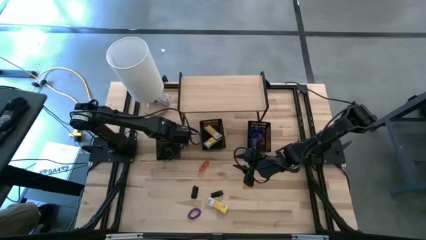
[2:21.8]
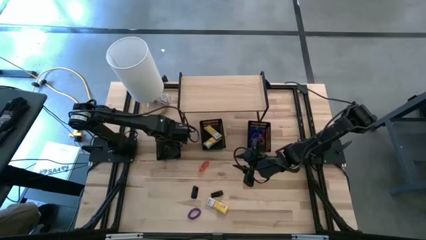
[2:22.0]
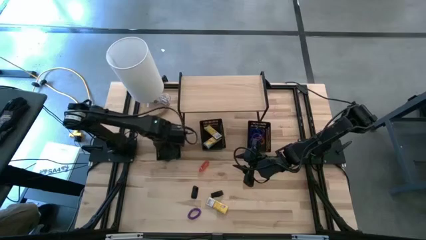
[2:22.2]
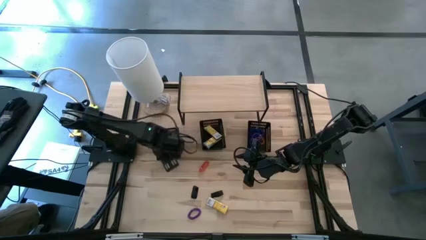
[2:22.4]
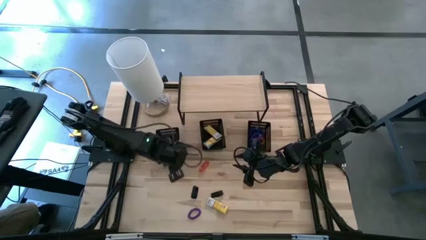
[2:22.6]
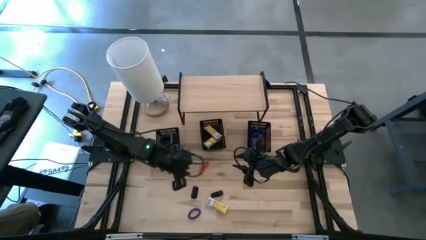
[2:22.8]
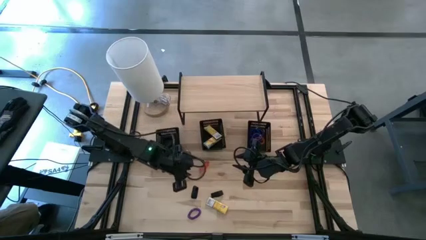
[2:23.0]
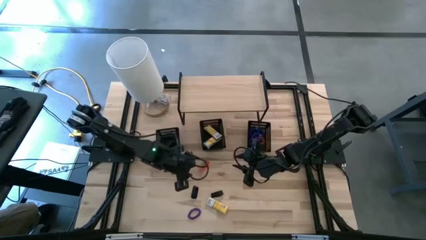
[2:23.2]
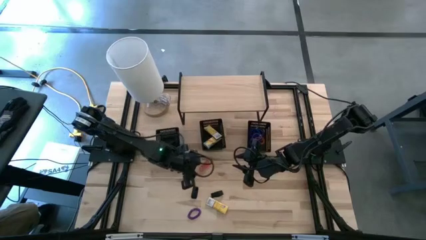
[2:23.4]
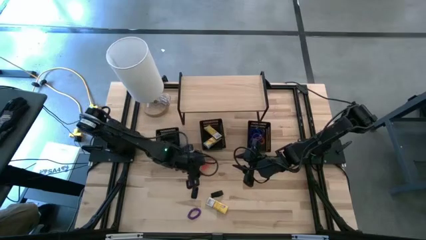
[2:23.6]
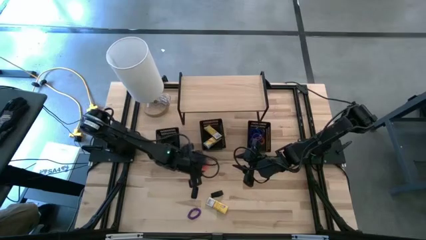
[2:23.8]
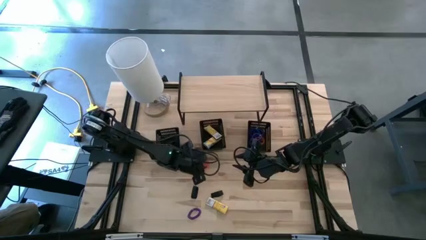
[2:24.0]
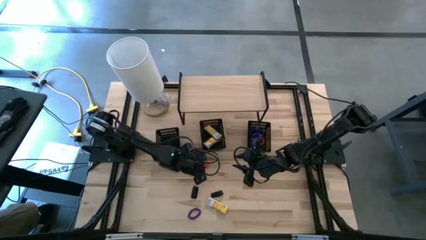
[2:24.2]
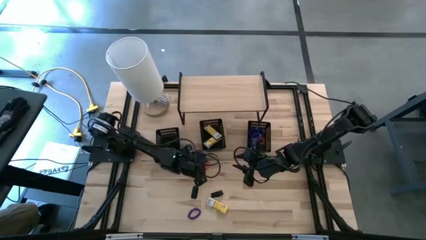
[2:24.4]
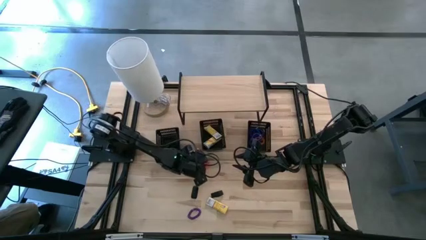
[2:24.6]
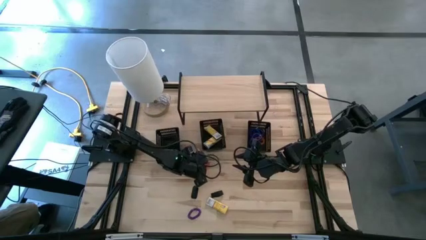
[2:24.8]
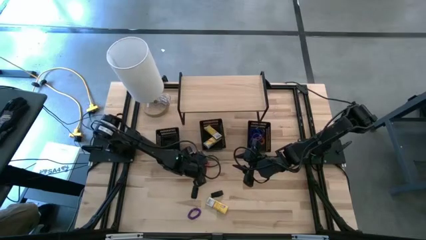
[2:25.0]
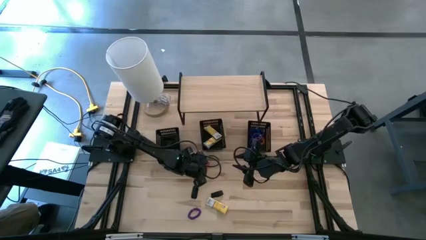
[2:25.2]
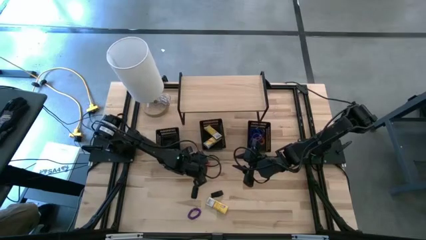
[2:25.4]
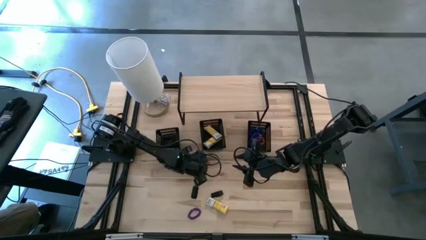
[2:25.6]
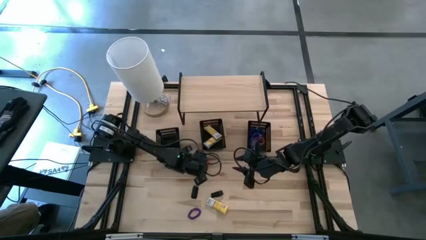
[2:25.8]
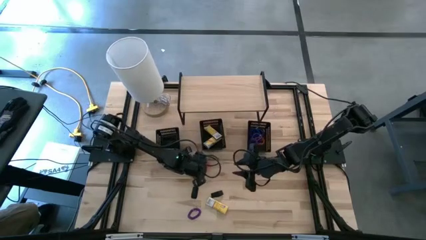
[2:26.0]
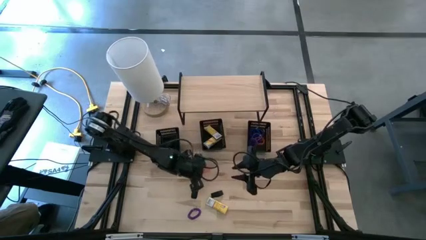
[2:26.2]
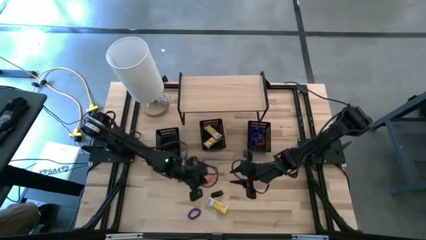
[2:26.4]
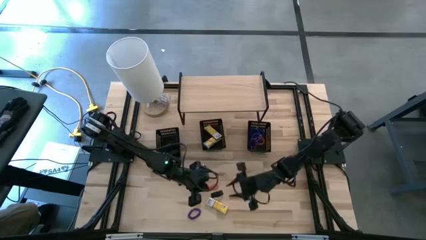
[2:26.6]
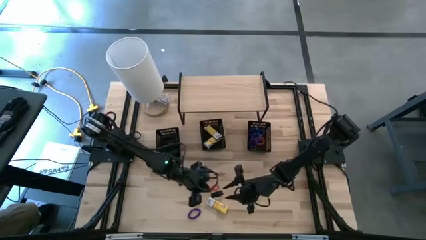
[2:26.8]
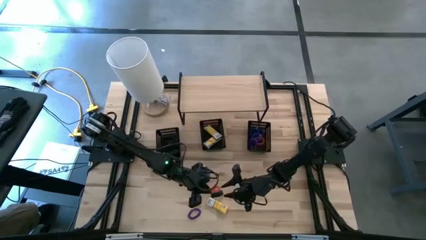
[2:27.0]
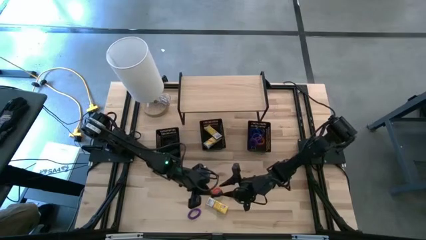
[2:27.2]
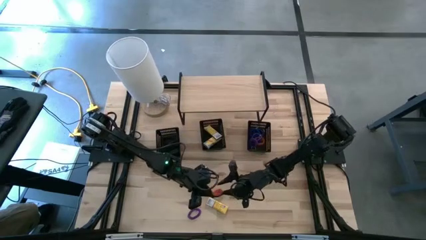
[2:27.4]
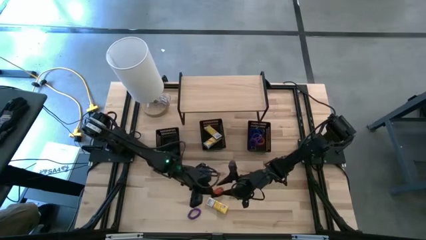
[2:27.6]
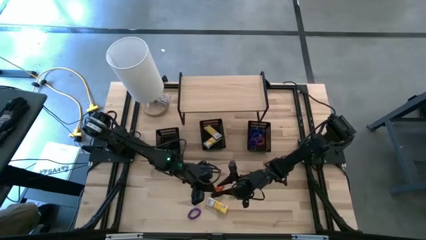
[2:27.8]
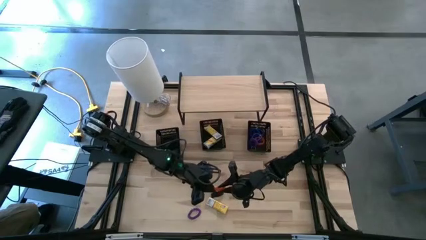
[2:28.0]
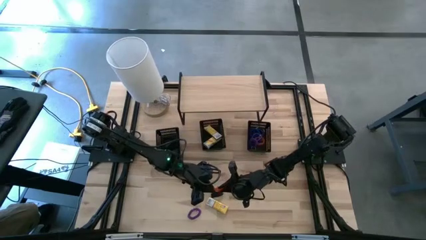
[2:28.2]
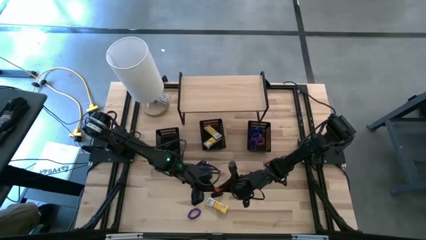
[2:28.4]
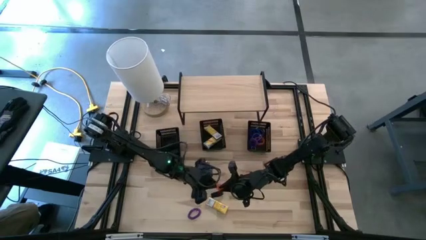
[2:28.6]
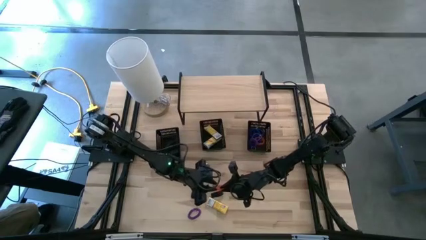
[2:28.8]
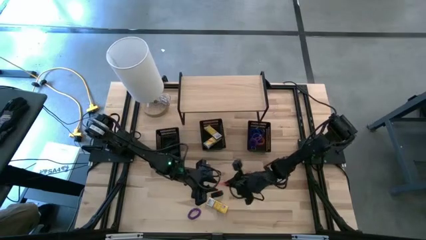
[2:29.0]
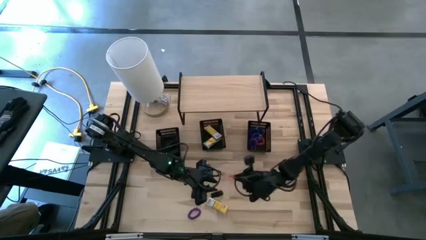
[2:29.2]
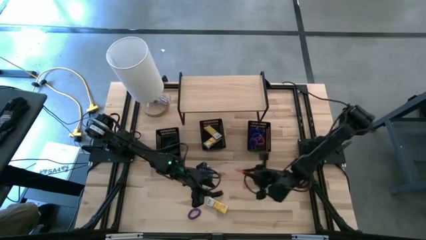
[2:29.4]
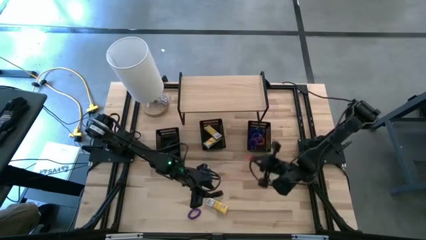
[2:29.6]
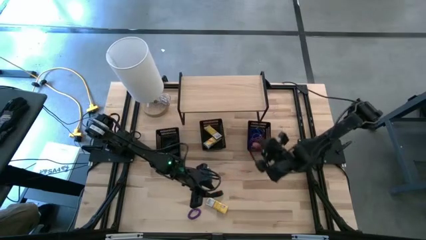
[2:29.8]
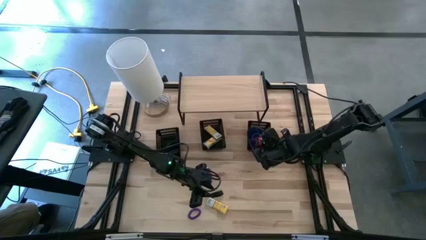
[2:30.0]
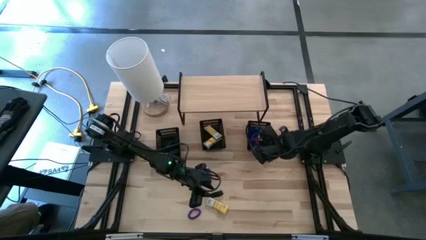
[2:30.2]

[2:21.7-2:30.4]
Task: Pick & Place Office Desk Supplies
Put the orange spring keychain into the right black bin

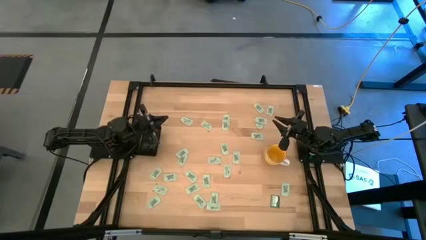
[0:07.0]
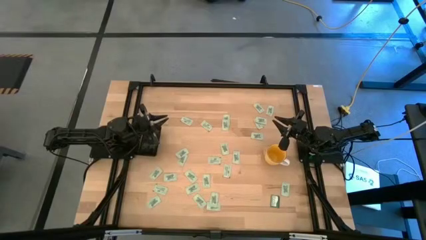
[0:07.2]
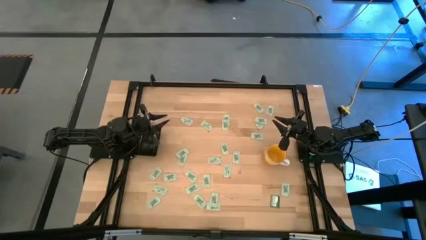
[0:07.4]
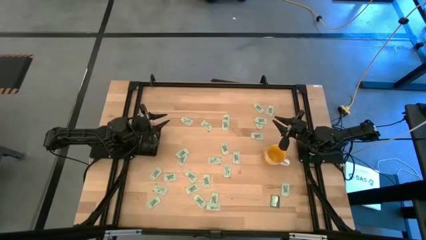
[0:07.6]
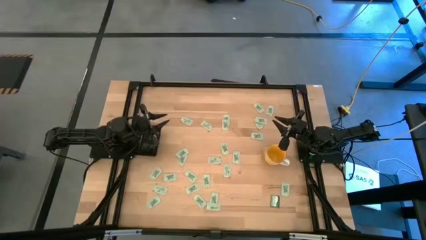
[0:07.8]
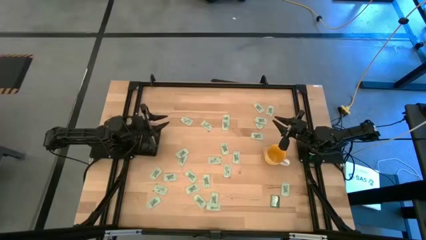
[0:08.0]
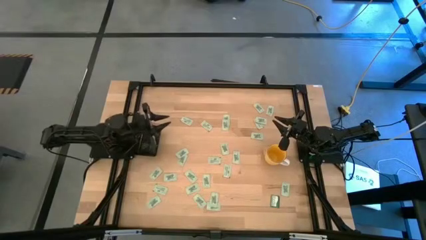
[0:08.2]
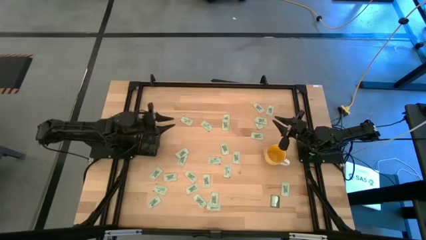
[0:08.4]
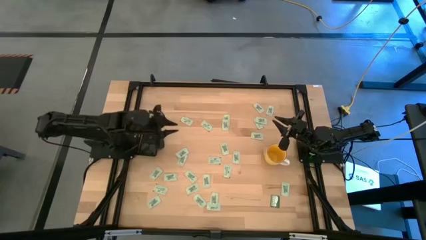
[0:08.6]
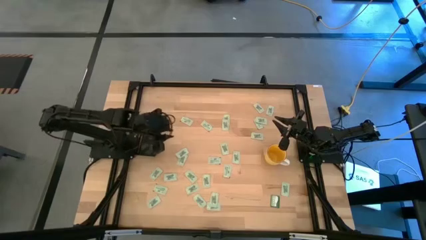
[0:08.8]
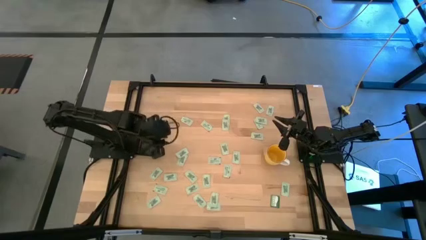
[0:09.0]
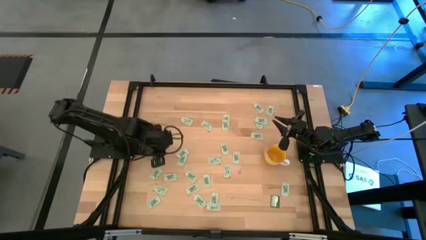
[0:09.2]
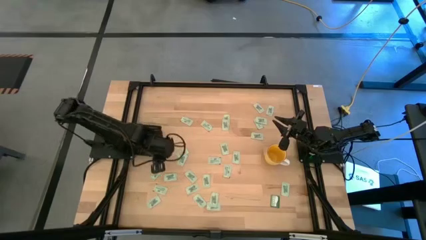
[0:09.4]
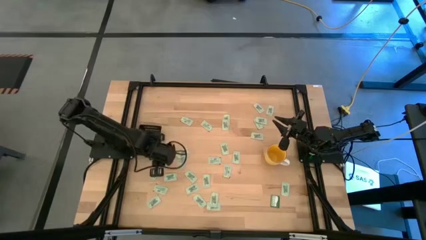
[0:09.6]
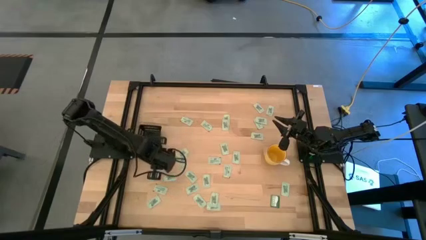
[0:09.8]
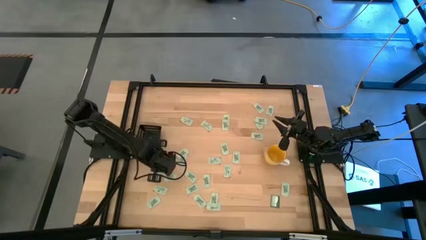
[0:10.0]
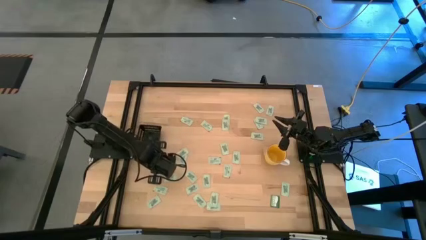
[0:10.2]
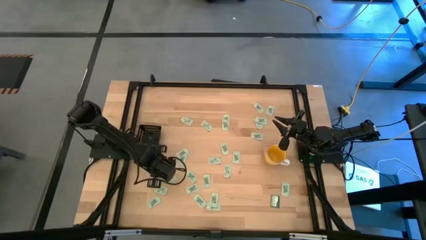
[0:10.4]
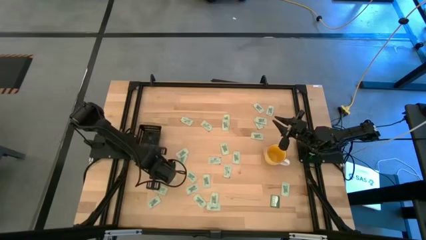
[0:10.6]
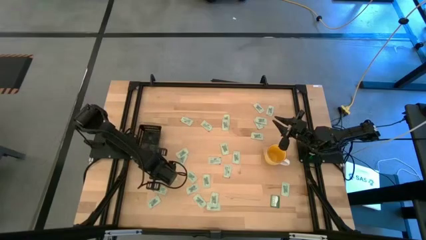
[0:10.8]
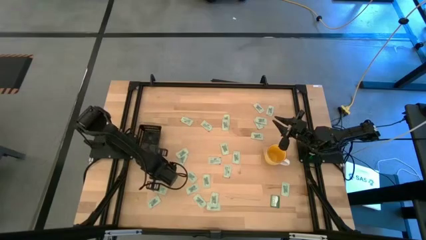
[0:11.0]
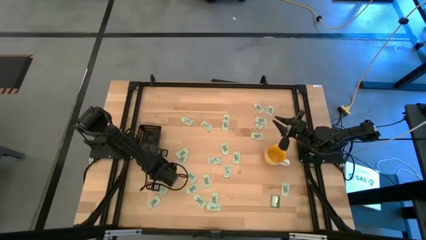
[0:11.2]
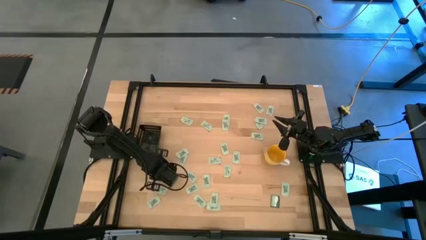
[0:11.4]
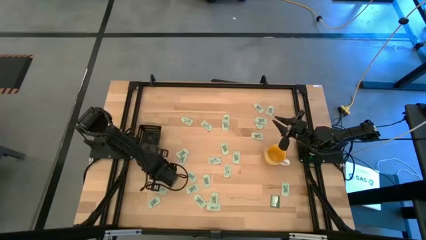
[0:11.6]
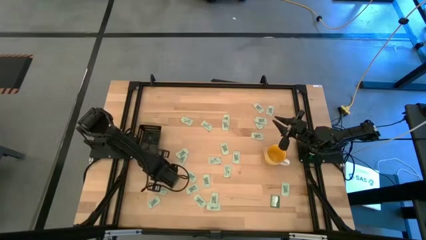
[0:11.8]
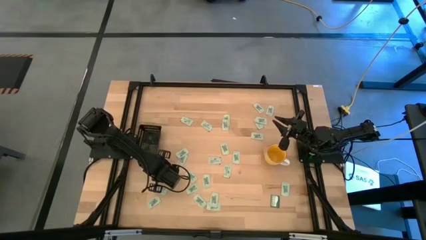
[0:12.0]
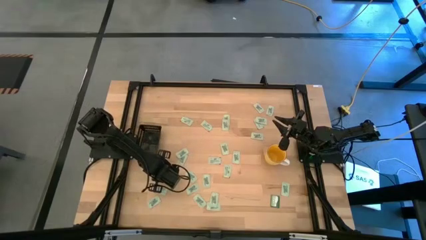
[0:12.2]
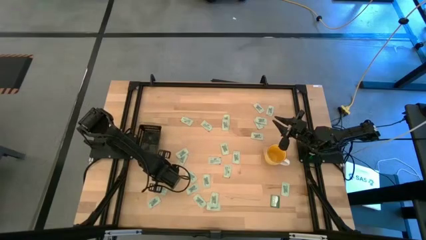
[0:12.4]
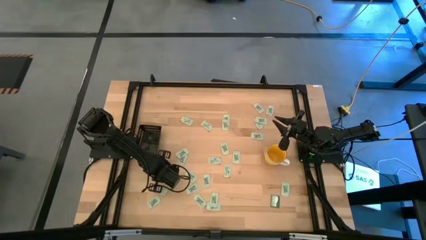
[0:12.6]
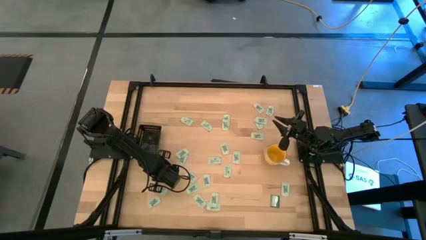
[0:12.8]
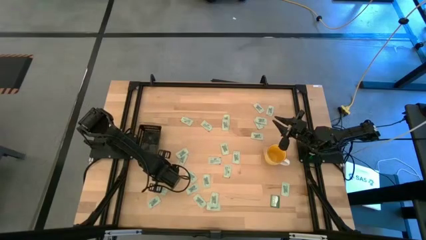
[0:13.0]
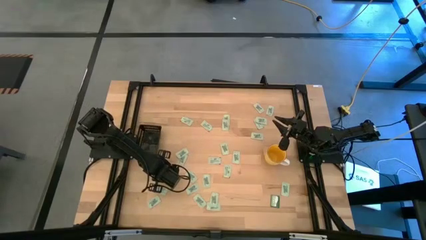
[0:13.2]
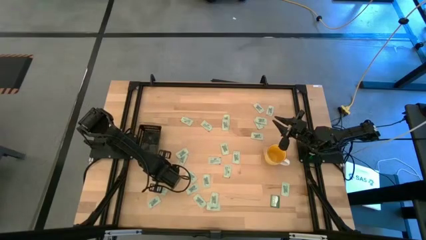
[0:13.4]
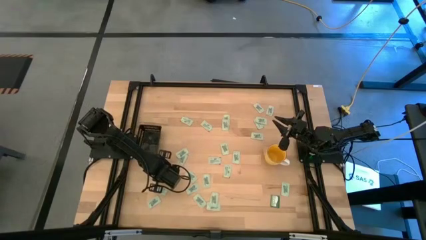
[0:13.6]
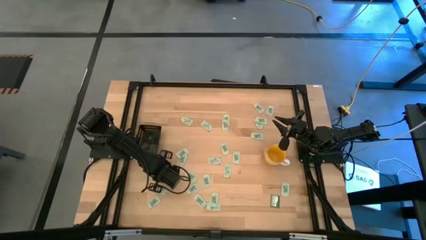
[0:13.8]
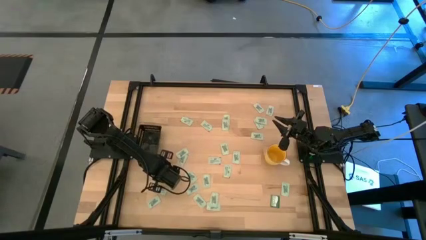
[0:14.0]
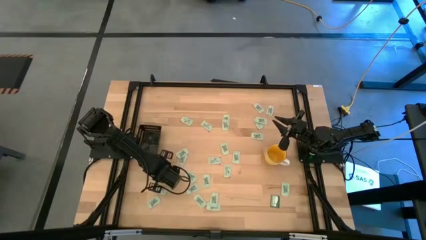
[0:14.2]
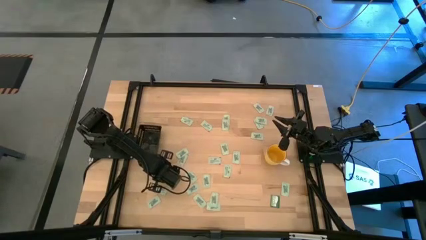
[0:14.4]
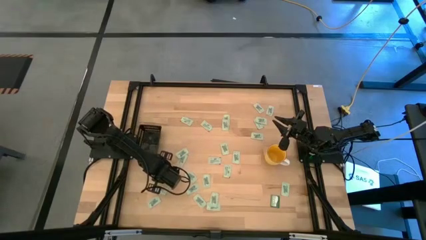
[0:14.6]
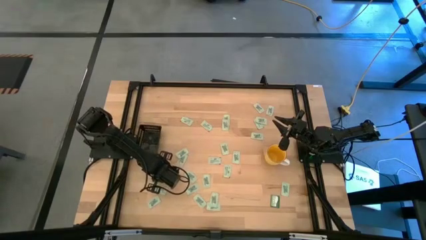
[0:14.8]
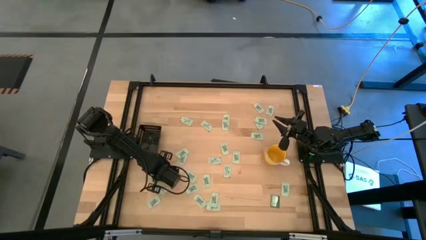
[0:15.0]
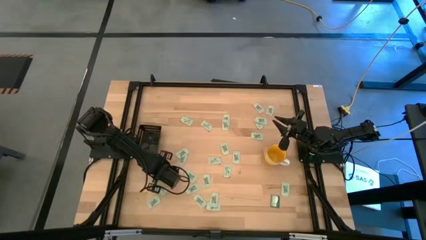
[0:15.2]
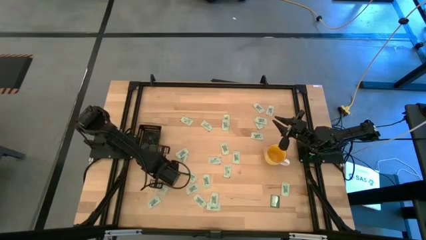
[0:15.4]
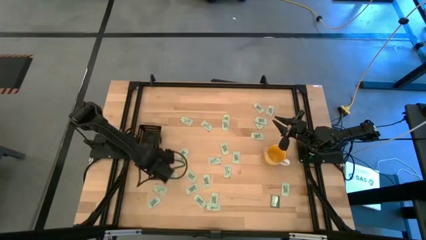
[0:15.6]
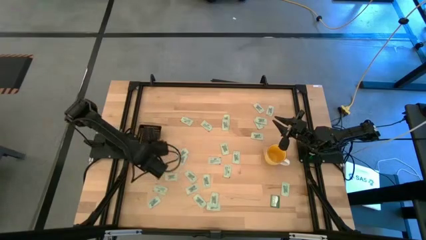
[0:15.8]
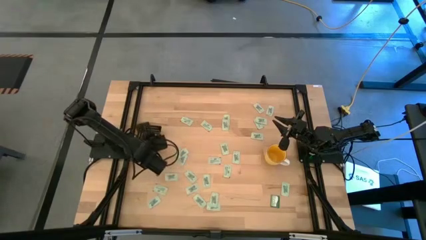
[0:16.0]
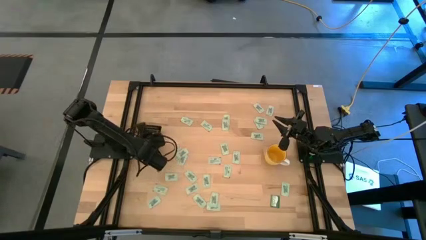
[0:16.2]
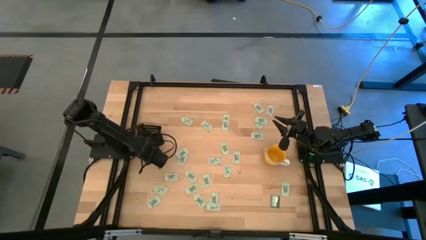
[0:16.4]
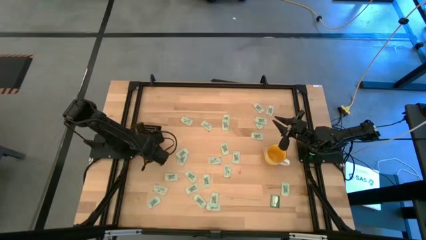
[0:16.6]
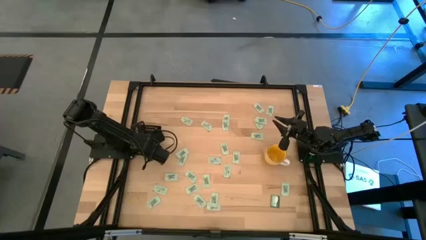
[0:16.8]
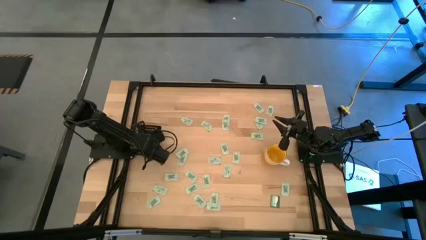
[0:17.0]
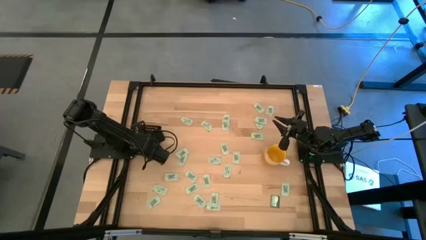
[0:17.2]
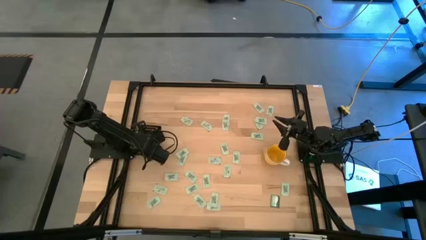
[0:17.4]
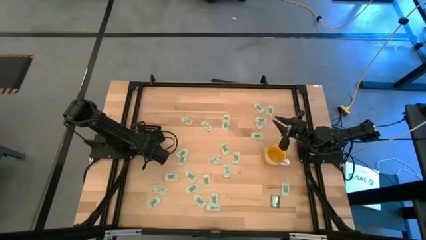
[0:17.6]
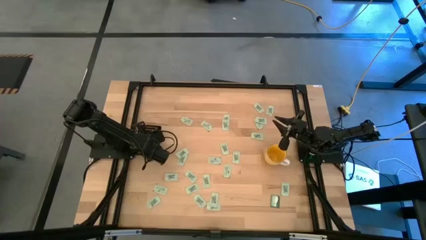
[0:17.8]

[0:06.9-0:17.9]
Task: Pick and place Stevia / Truvia into bins
Put the stevia packet into the black bin
